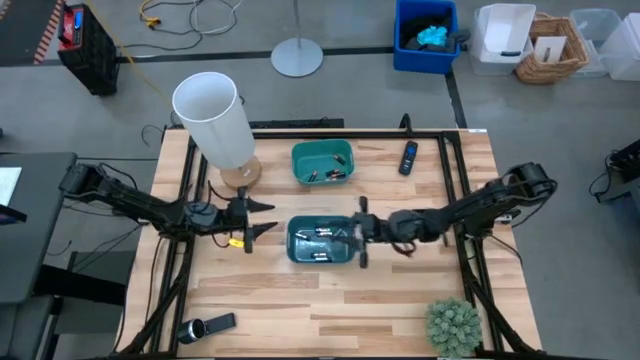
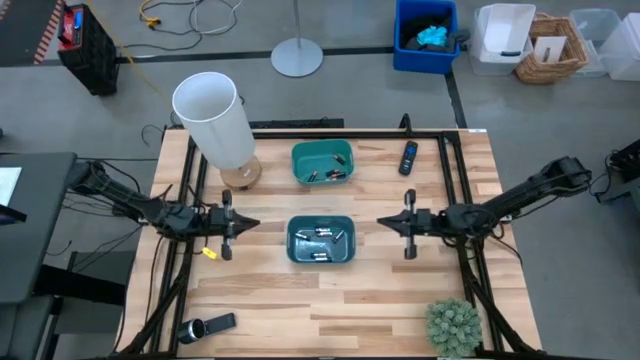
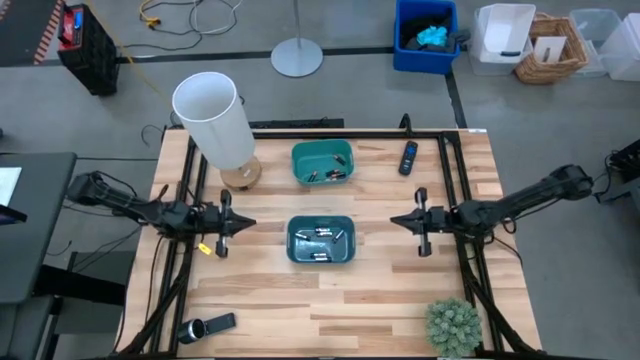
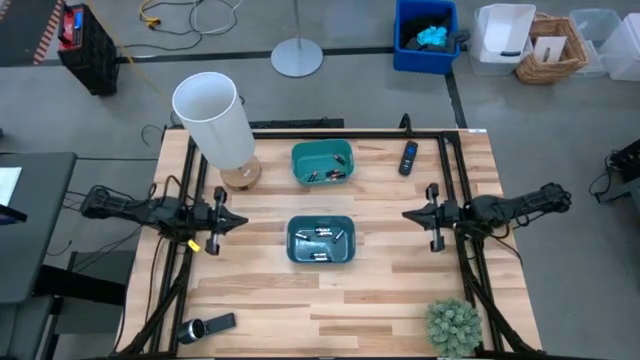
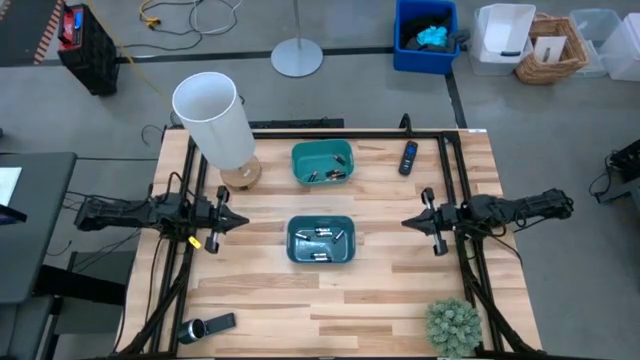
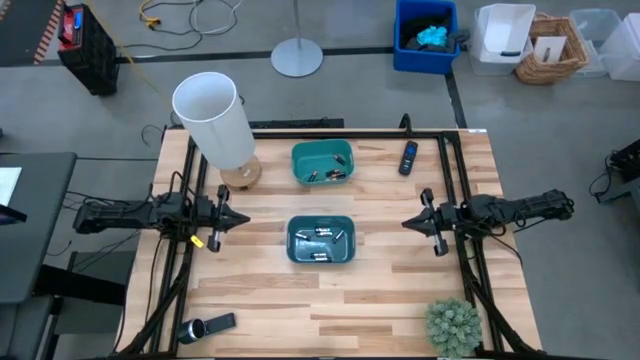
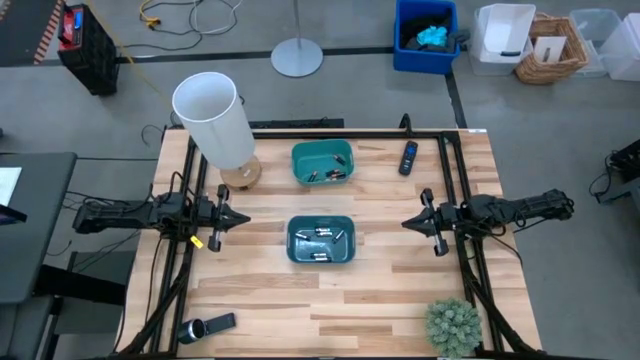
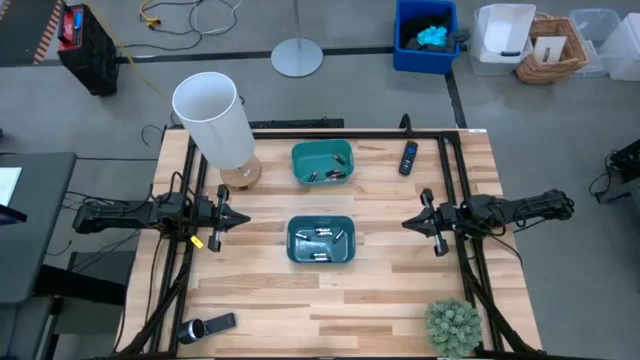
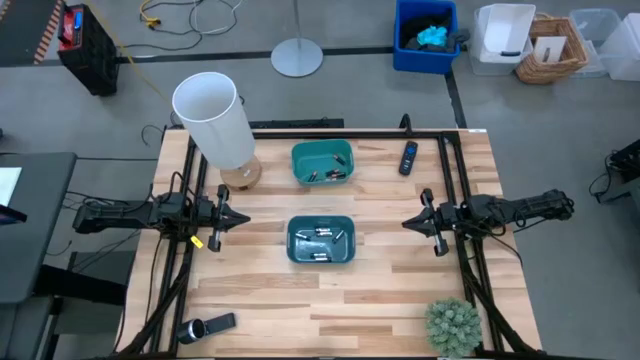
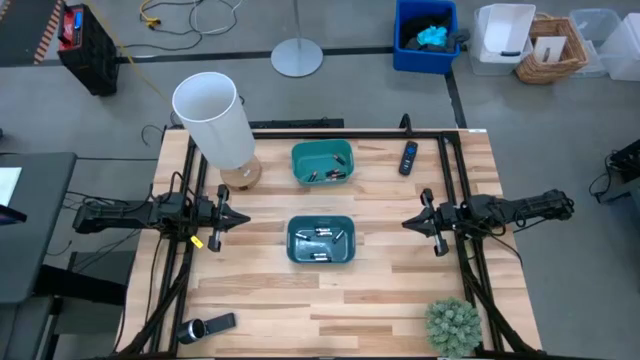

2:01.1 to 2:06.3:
Task: Sort batteries
Return to Home Position

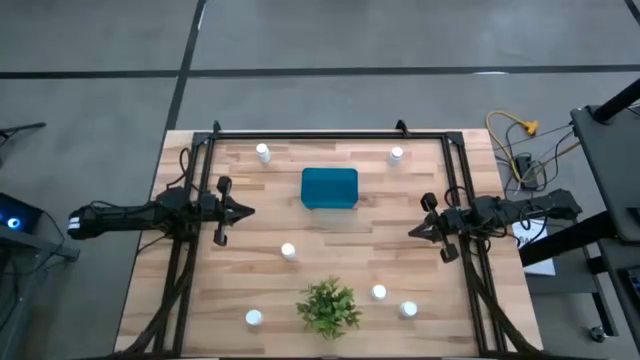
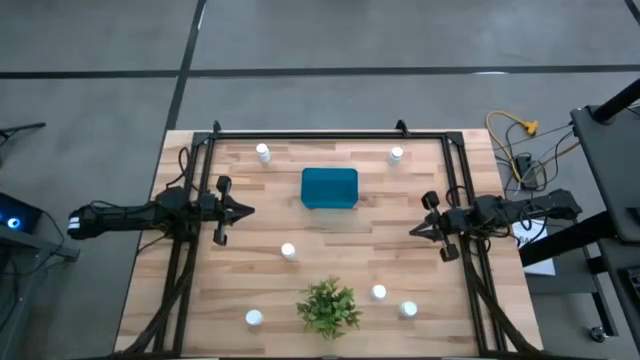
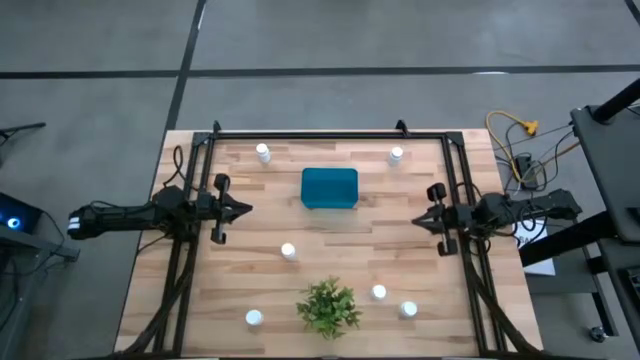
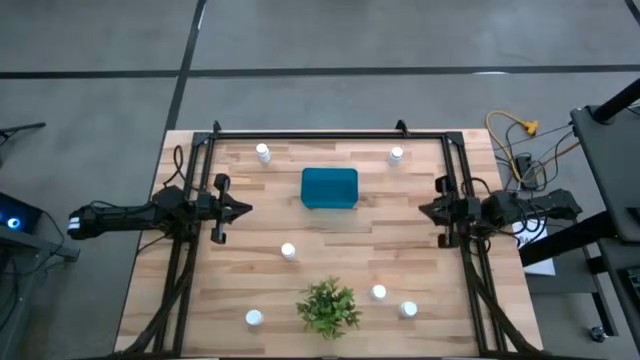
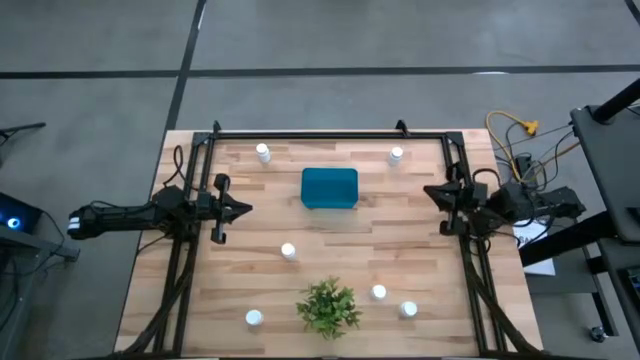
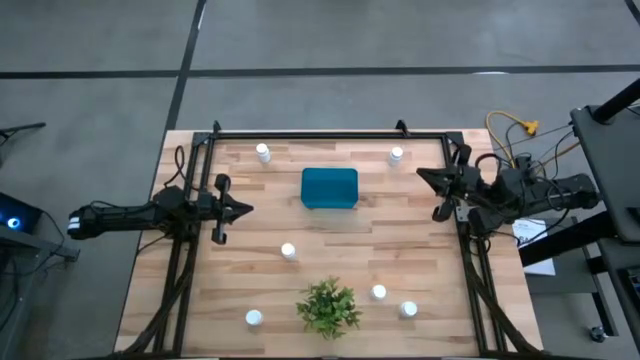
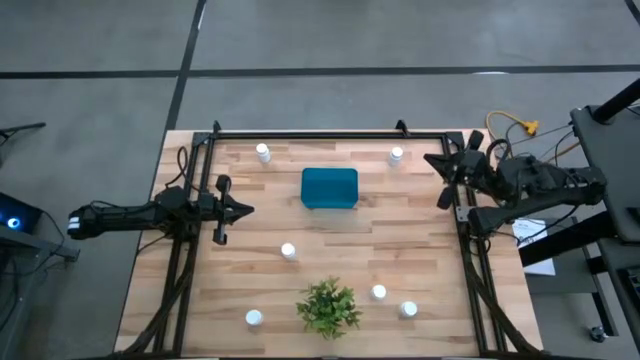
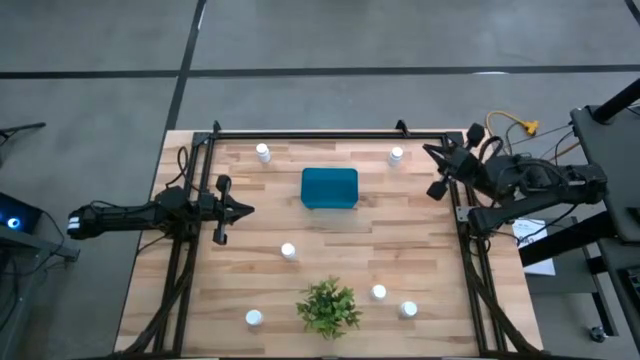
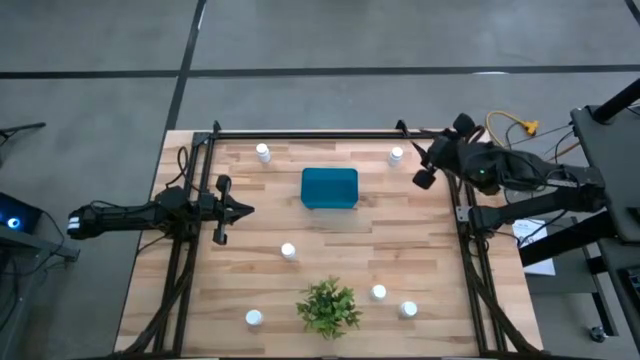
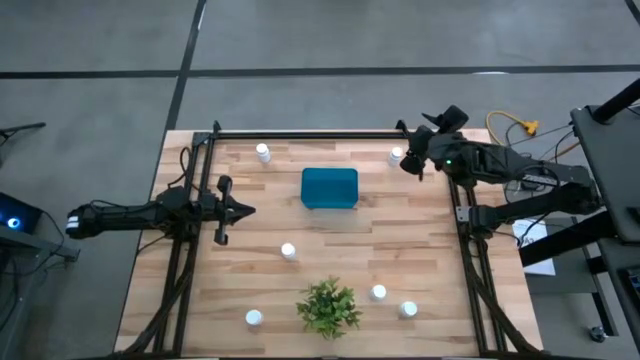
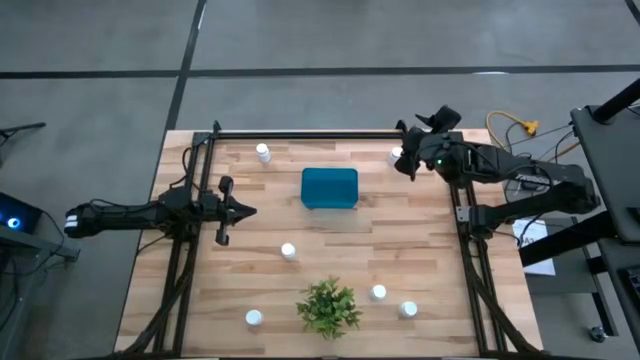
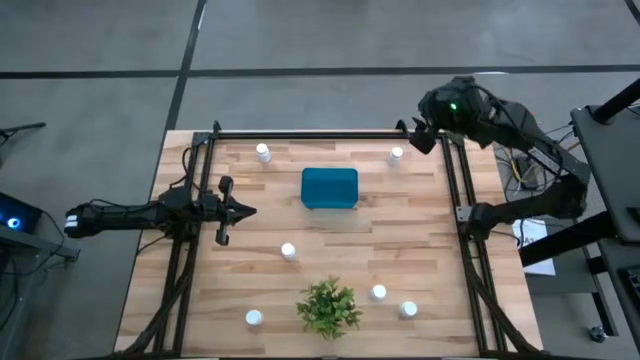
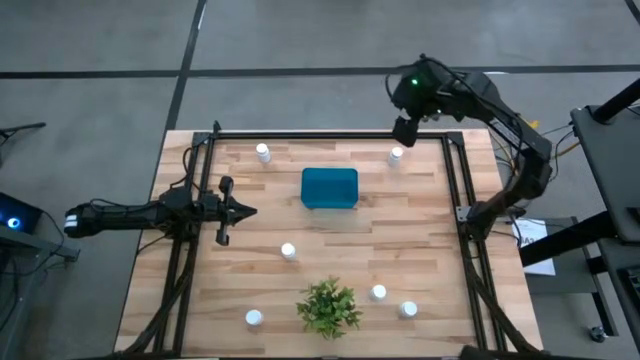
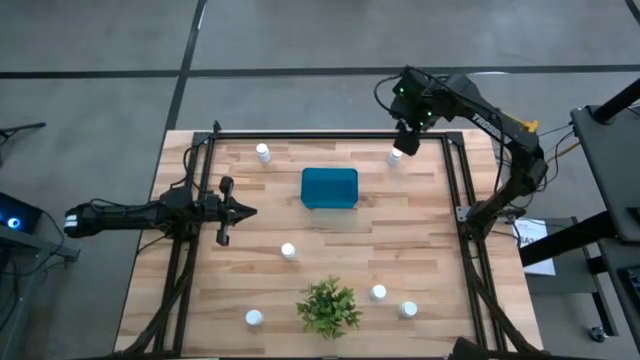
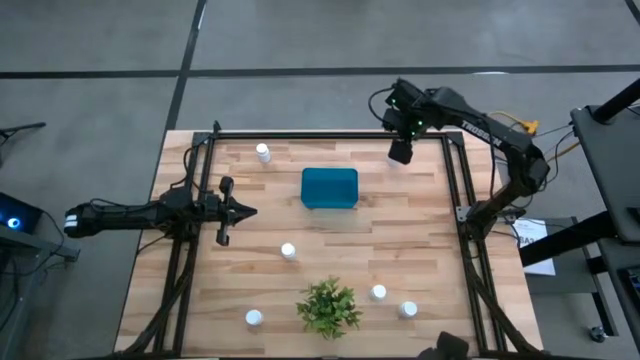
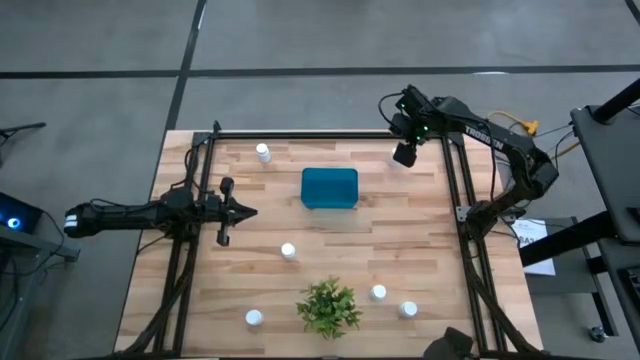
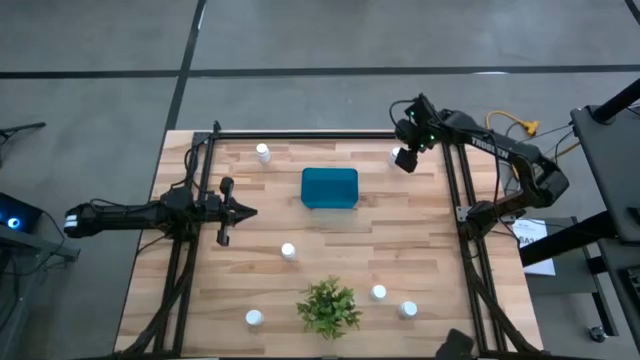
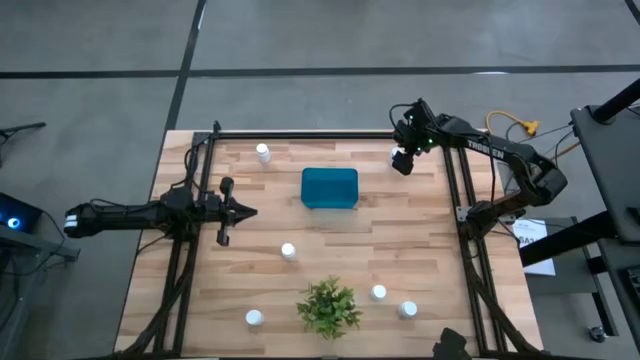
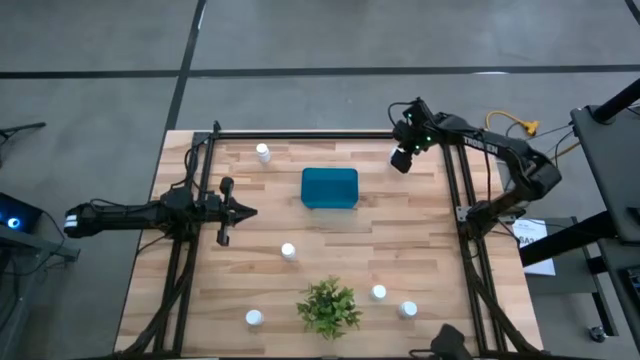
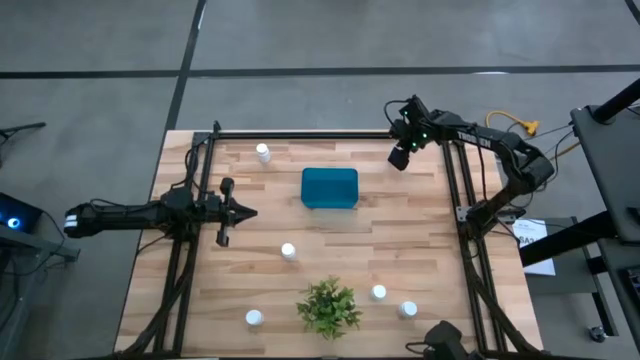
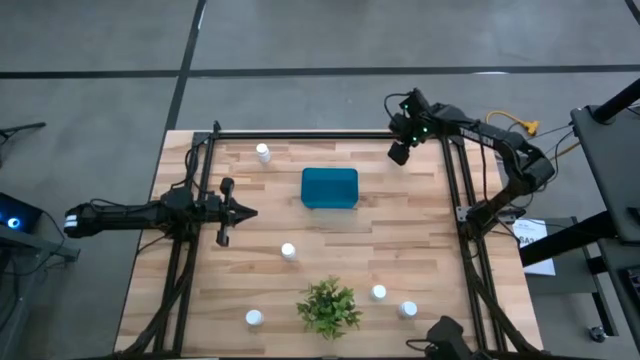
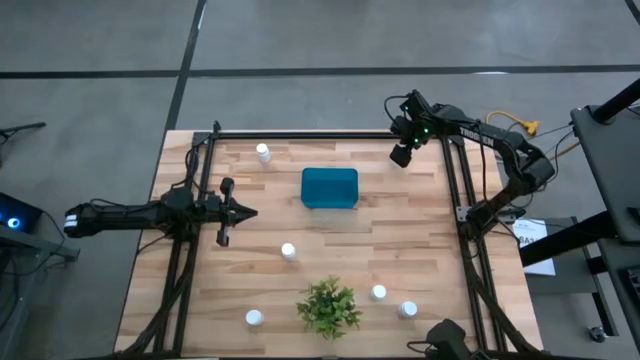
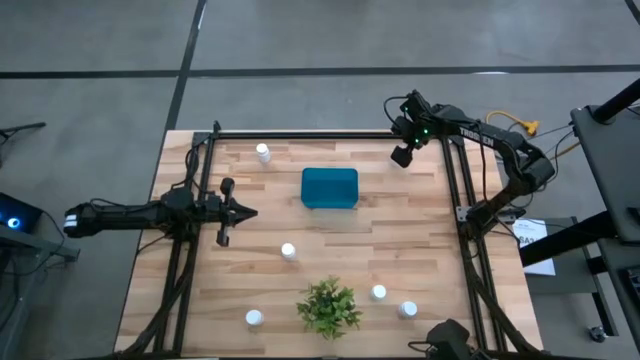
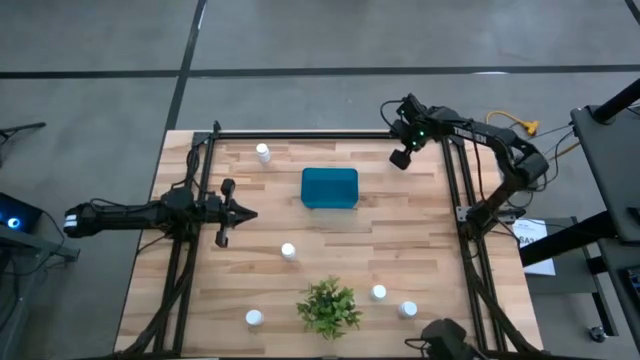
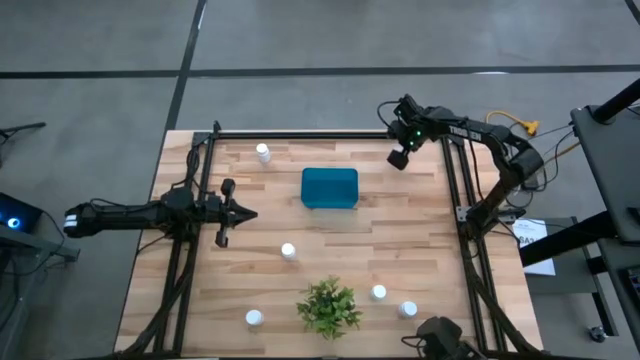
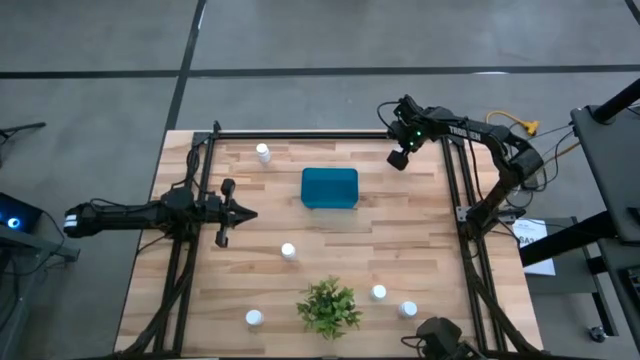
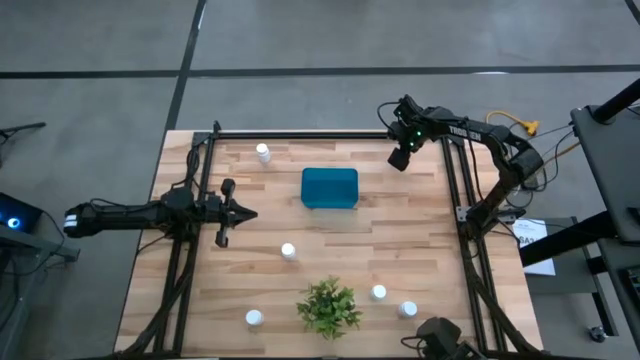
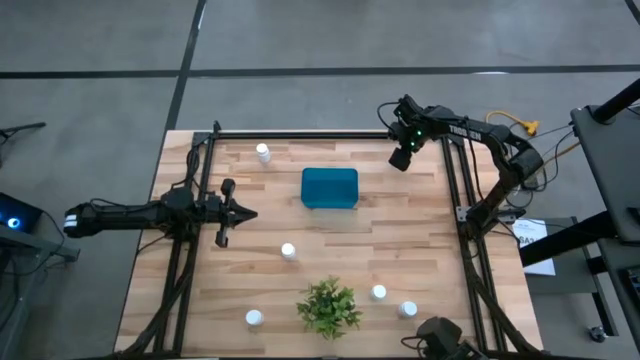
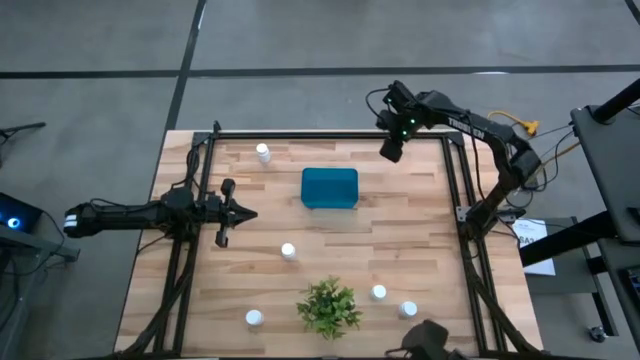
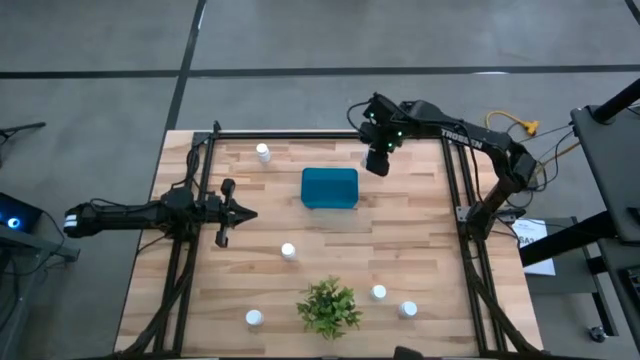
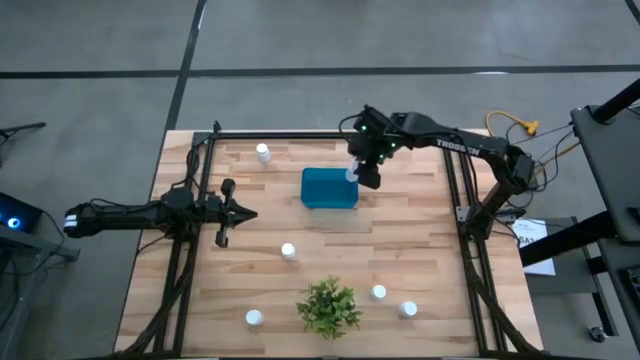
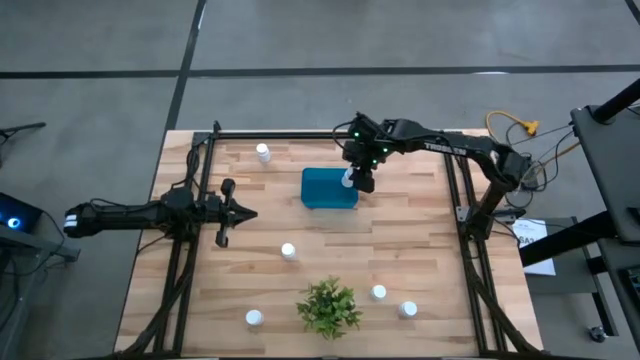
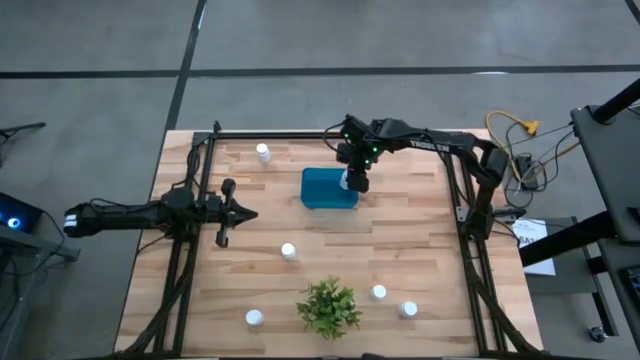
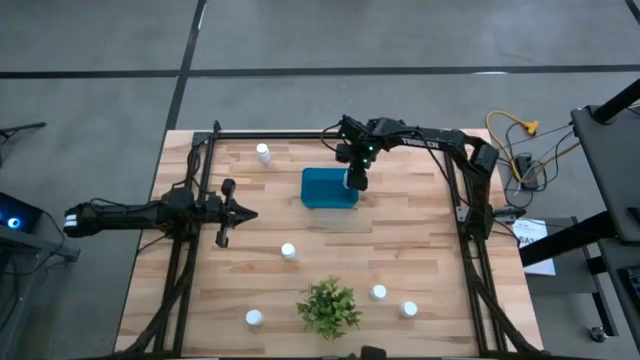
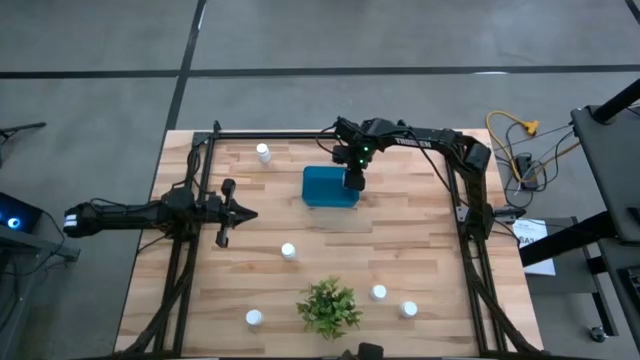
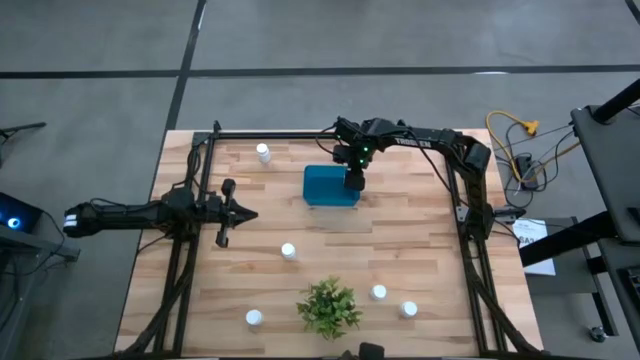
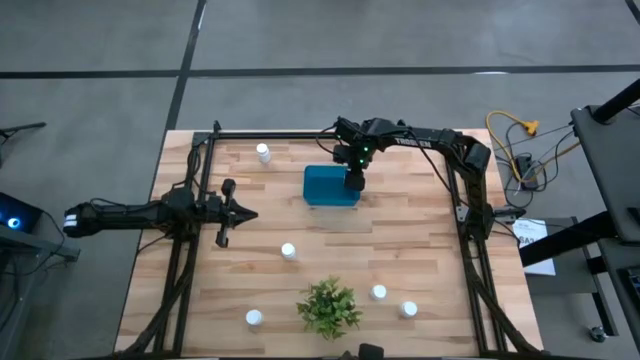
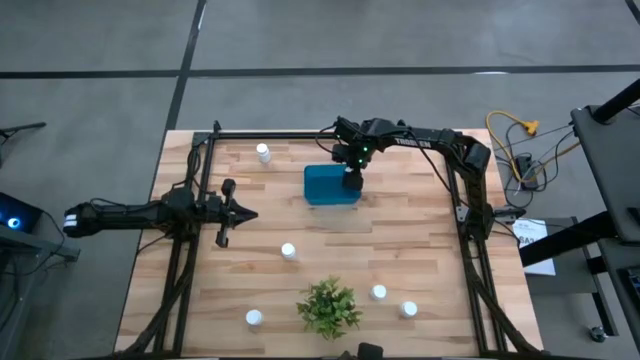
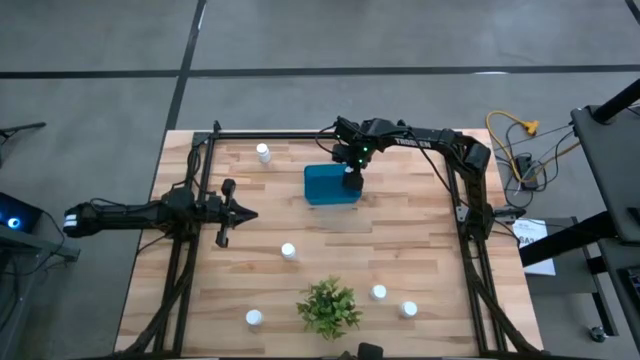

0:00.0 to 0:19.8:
Task: Pick and place pill bottles into a basket
Put the white pill bottle into the blue bin
